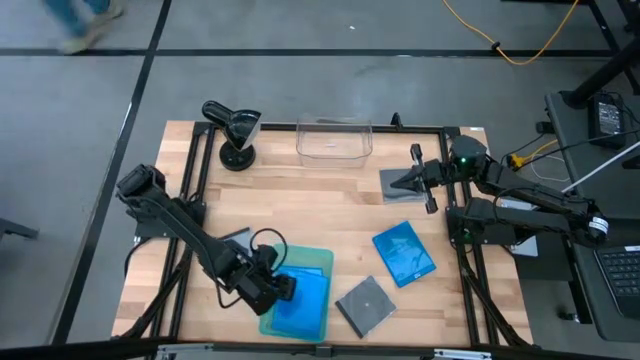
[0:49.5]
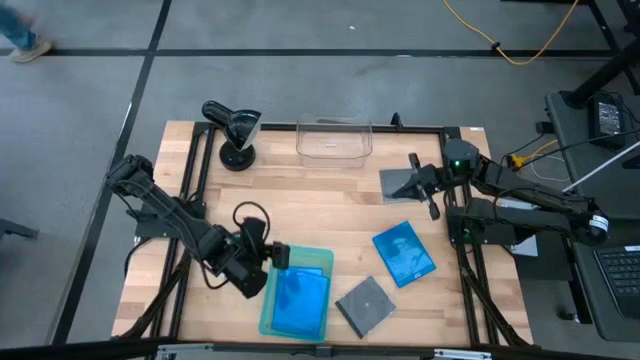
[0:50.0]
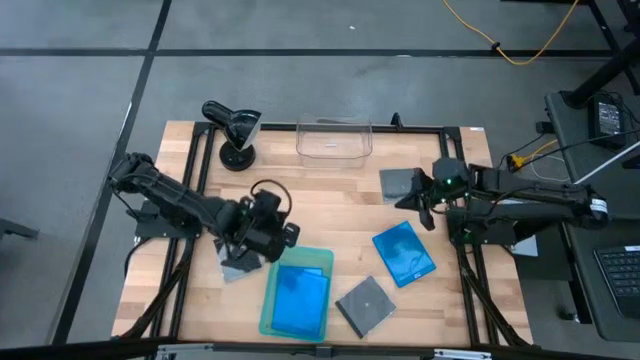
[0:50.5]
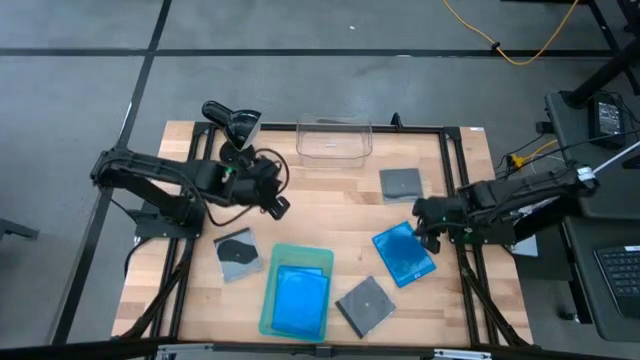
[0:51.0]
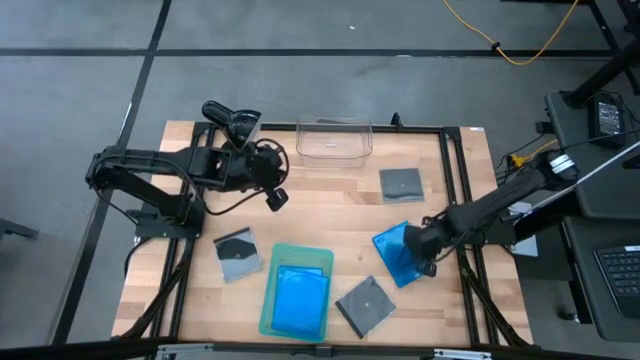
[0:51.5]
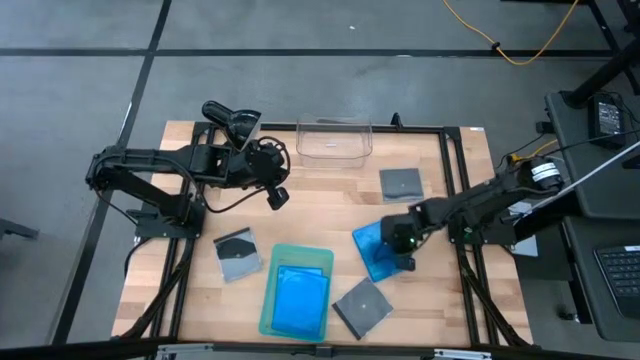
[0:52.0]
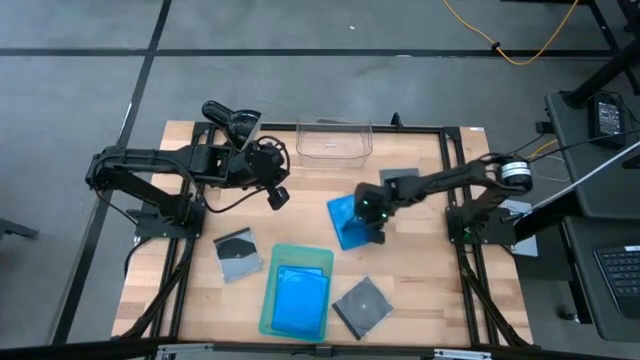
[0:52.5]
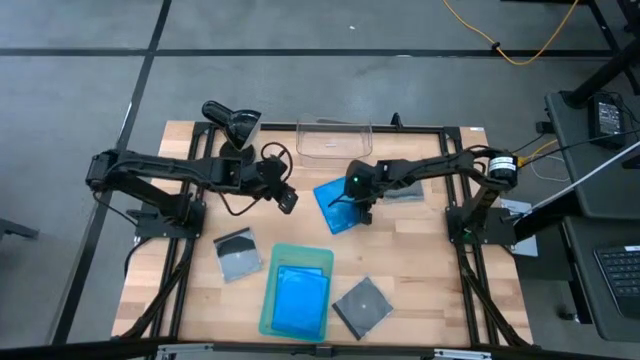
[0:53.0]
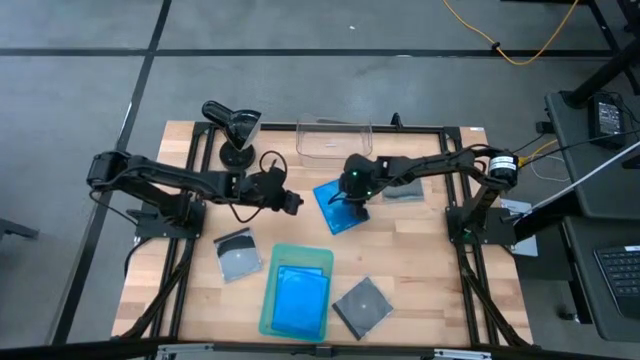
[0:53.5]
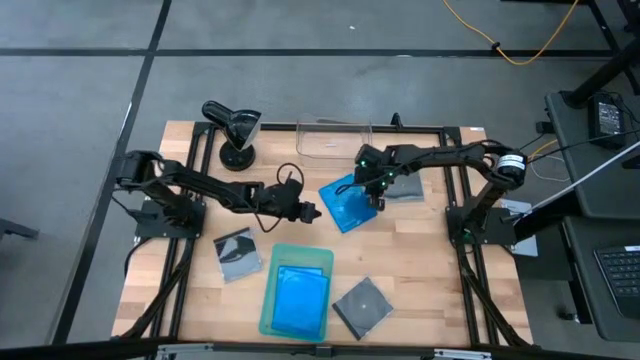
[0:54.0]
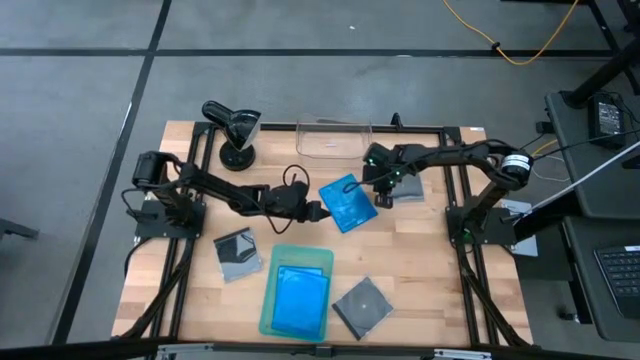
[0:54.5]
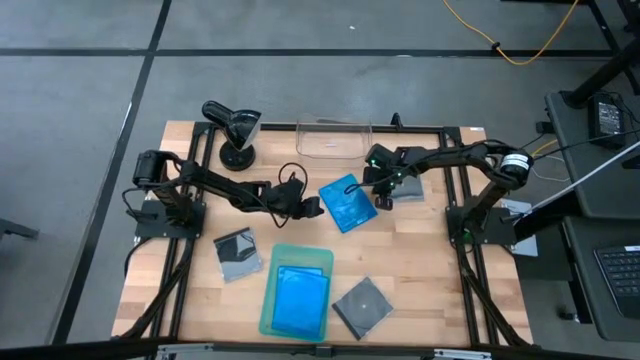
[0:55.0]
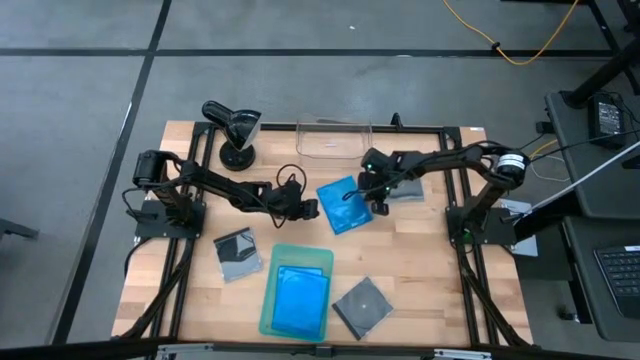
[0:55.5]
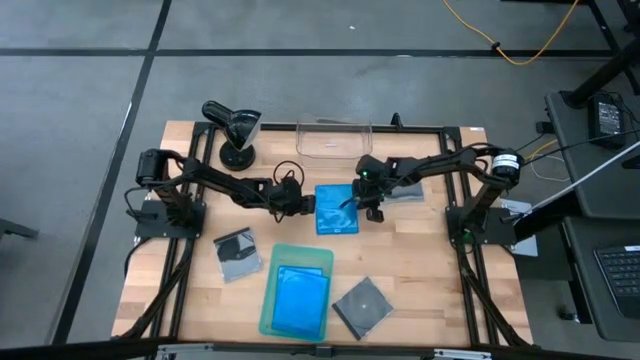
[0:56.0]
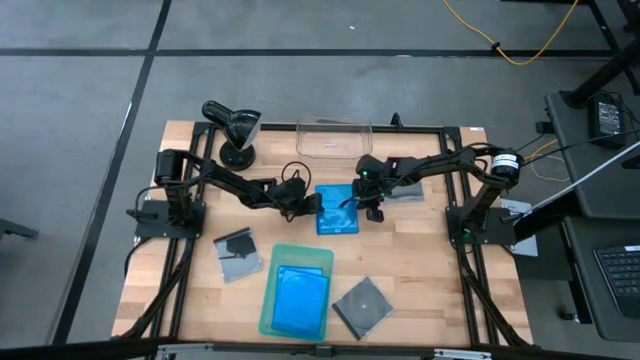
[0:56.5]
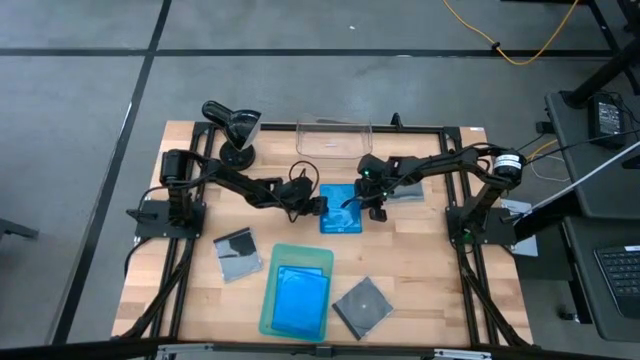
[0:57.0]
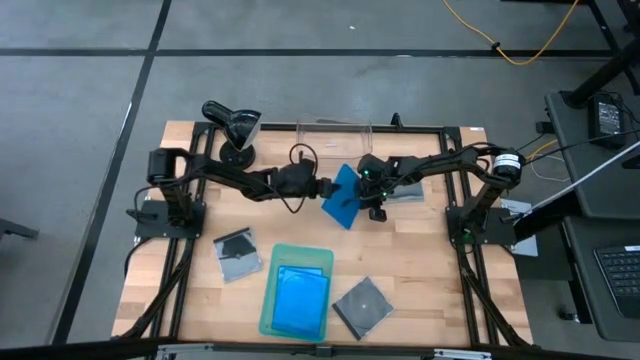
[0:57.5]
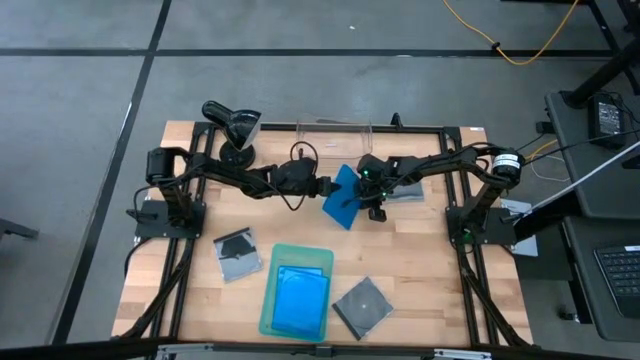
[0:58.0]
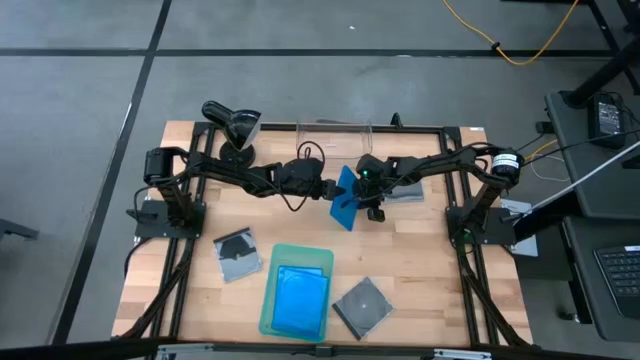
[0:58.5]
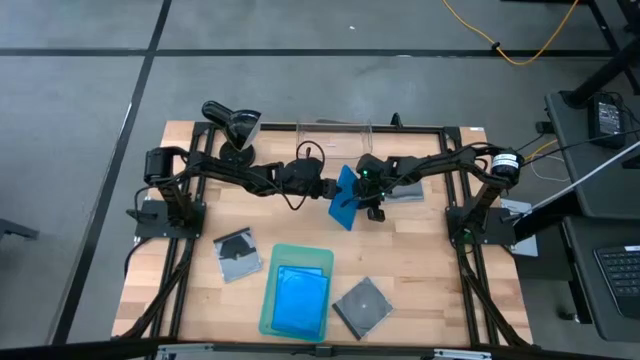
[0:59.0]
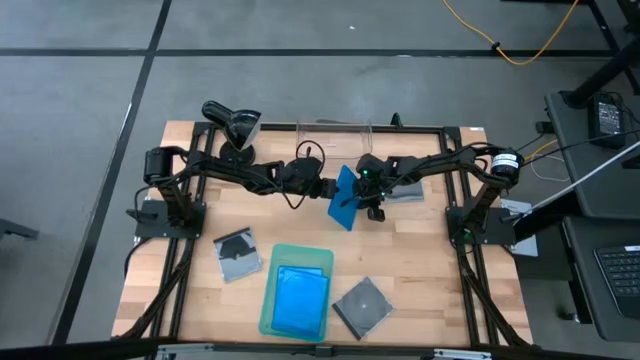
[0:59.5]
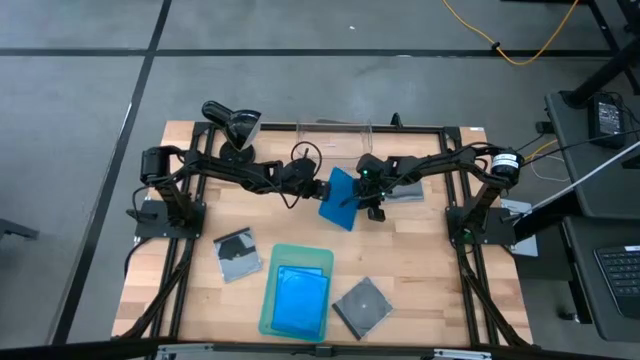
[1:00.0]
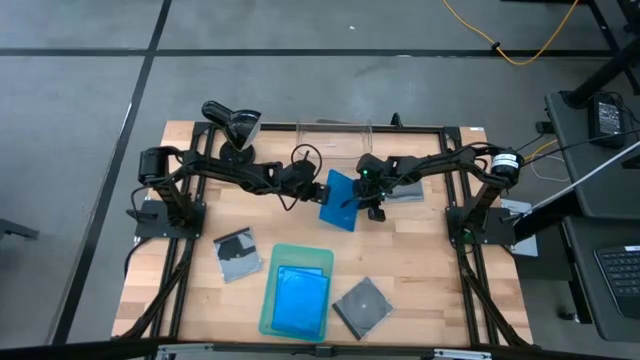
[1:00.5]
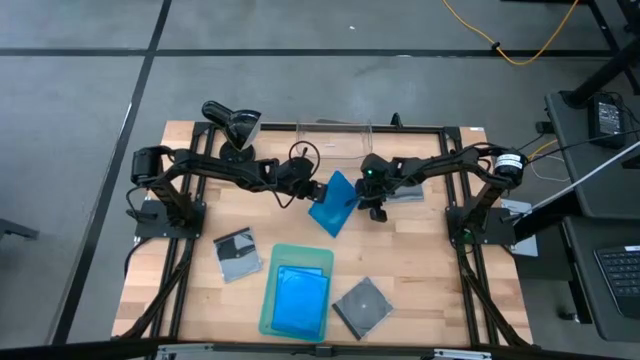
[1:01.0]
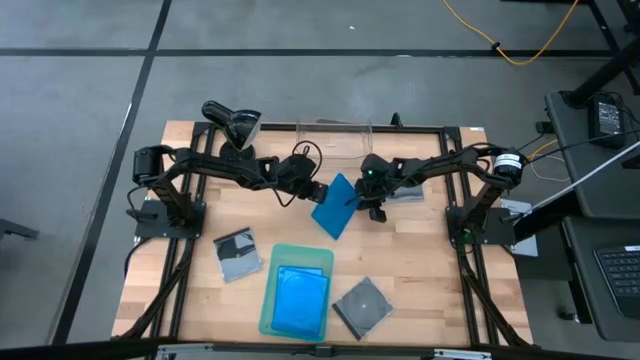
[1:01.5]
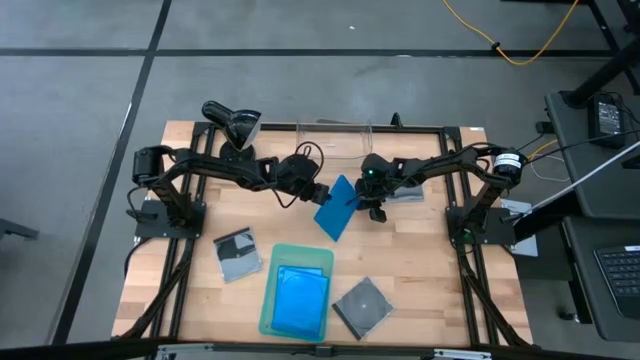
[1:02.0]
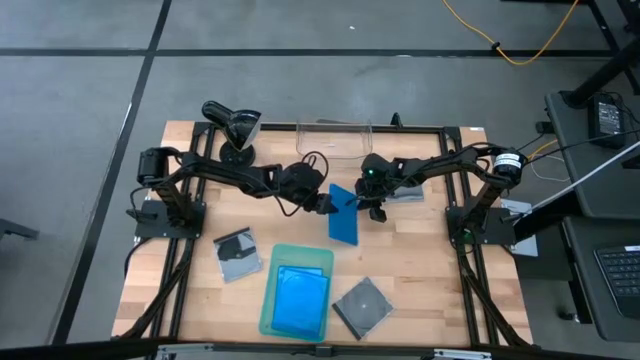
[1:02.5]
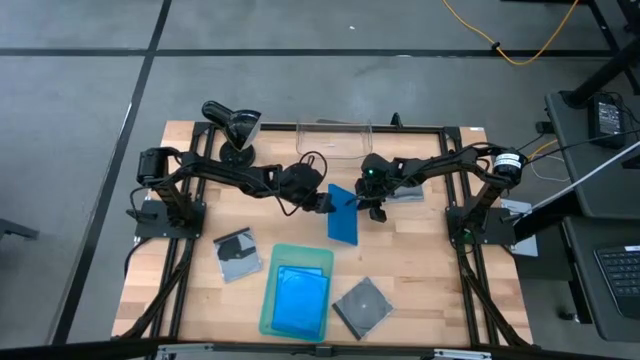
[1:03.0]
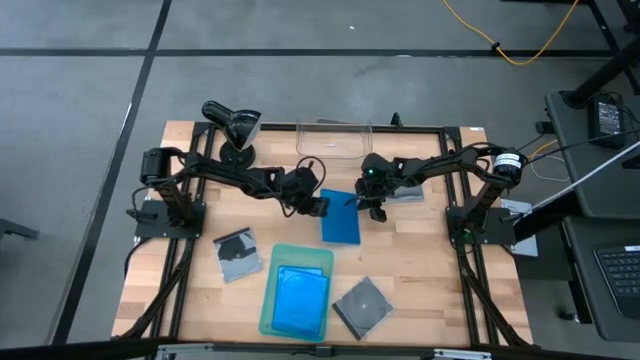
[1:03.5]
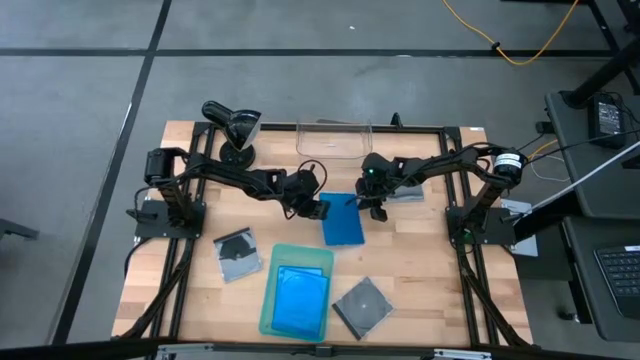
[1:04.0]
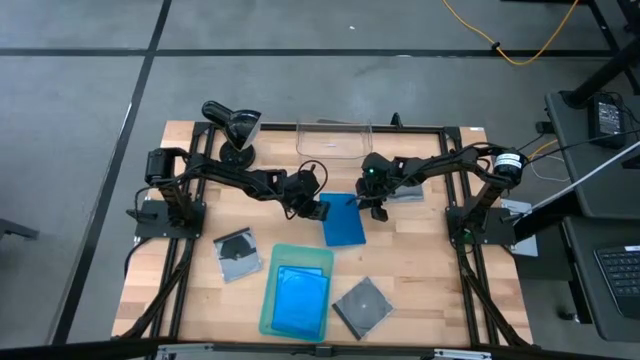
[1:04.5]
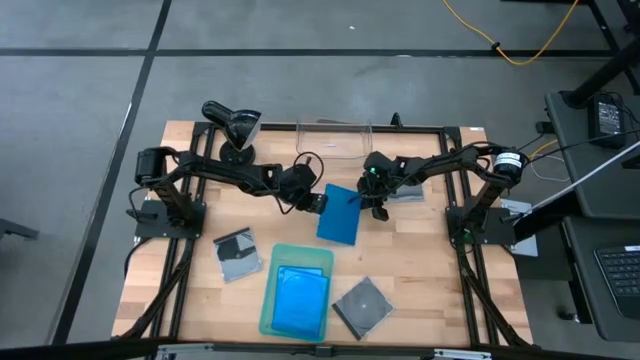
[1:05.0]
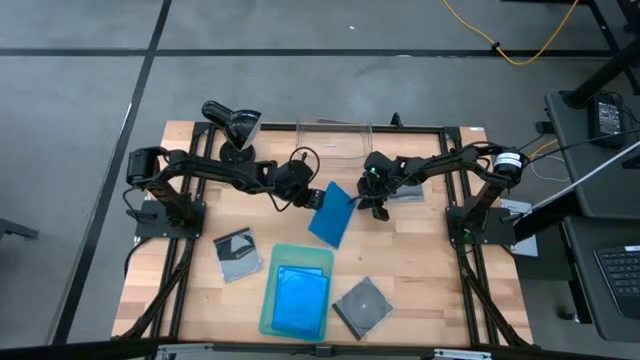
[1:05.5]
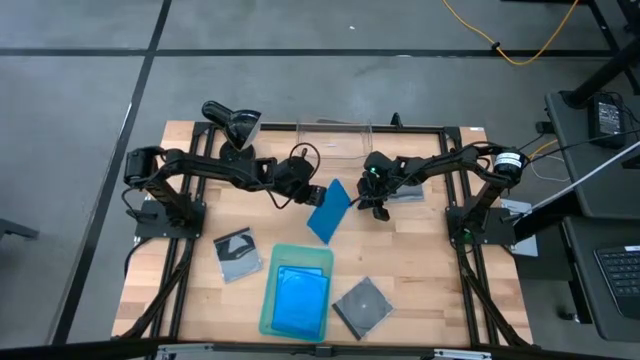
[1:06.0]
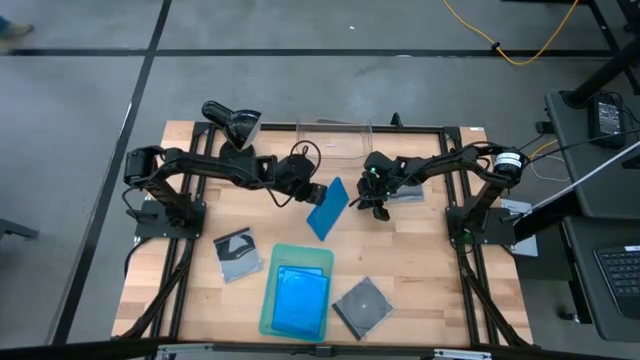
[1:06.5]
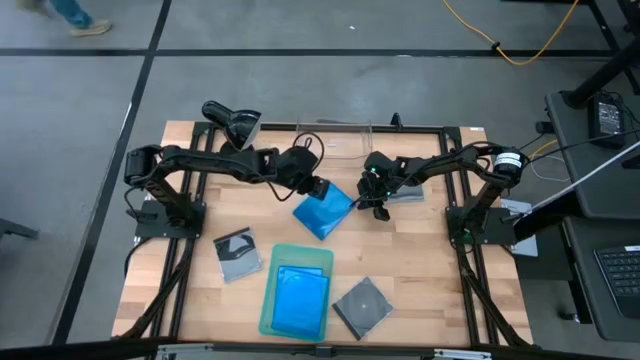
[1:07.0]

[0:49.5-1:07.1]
Task: Pick & place jewel cases by type
Put the blue cd case into the green bin

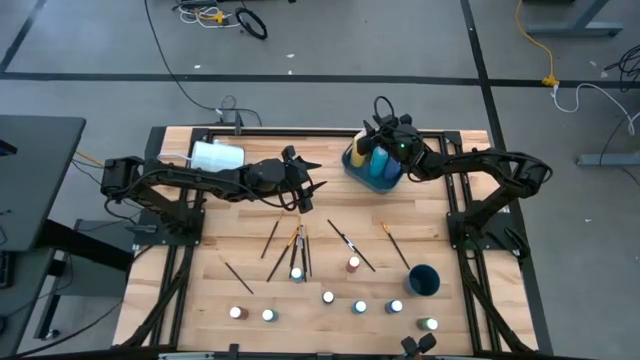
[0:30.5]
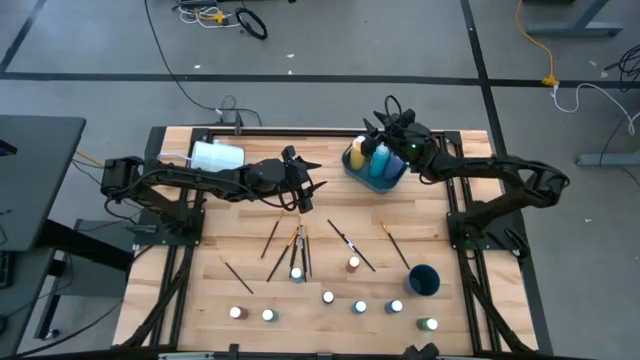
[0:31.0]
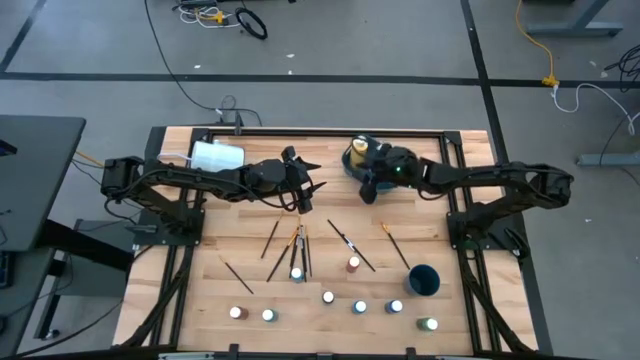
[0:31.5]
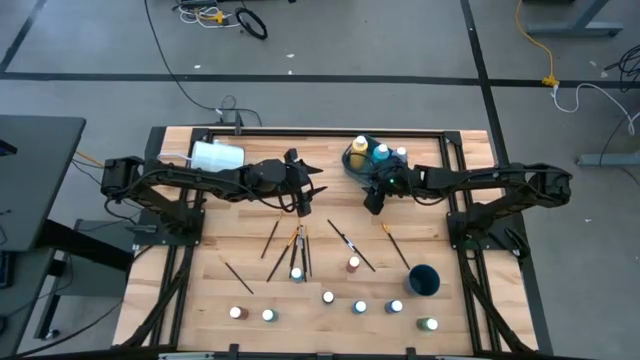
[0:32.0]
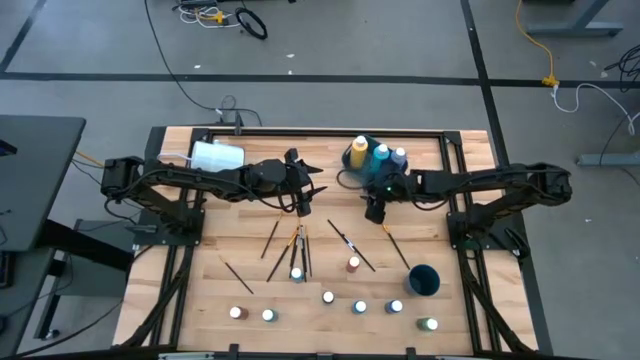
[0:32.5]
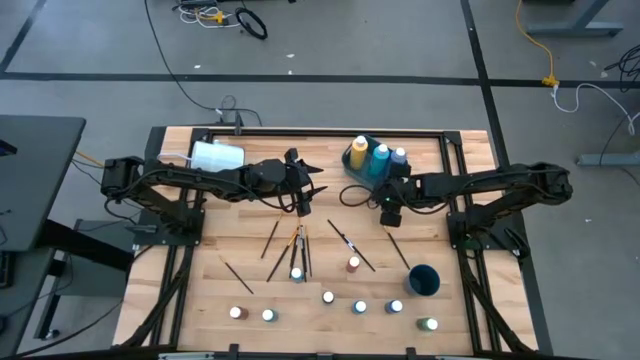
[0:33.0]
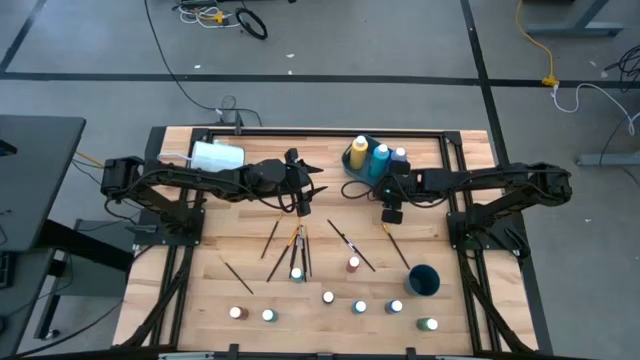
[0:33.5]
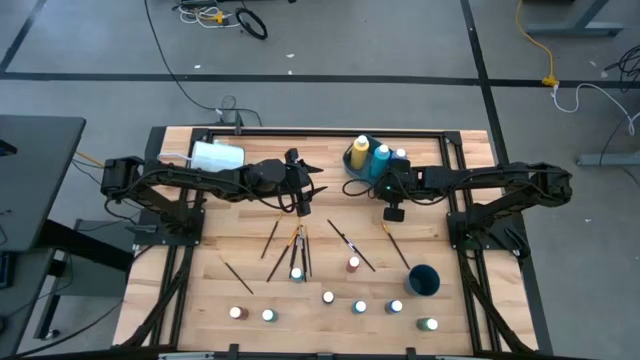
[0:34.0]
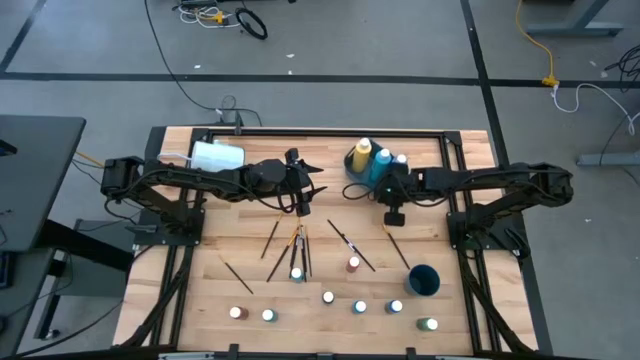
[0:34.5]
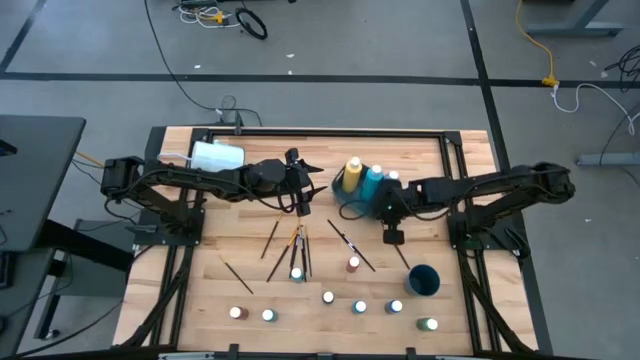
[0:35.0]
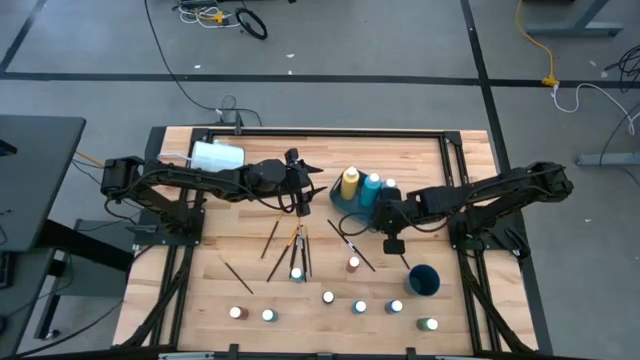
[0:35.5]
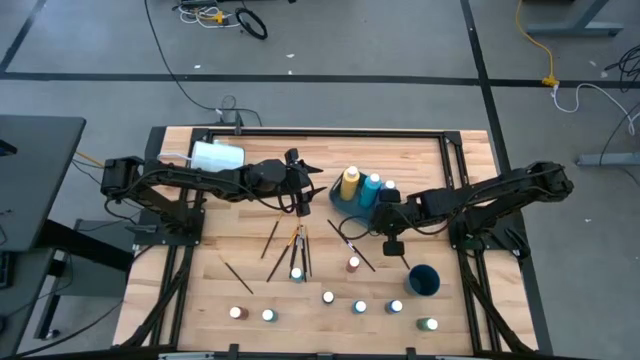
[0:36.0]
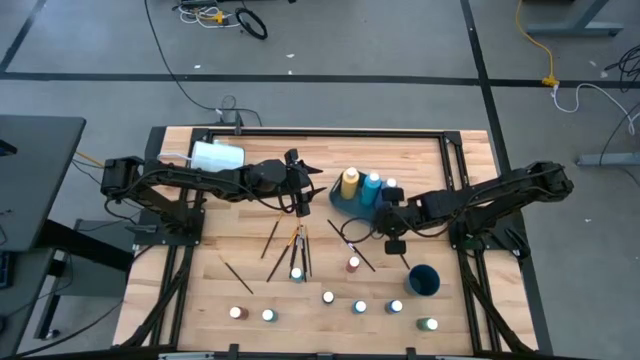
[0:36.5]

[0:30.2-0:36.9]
Task: Pick & Place Paint Supplies
Adjust the bin on the table
